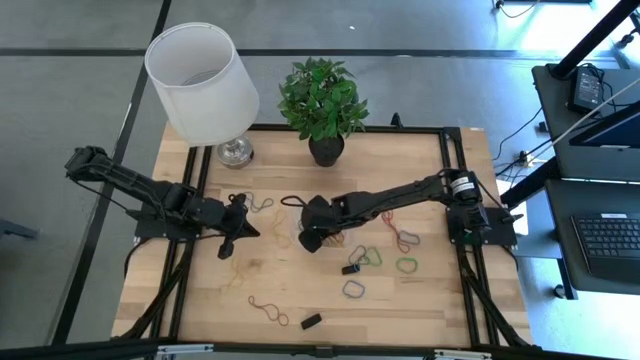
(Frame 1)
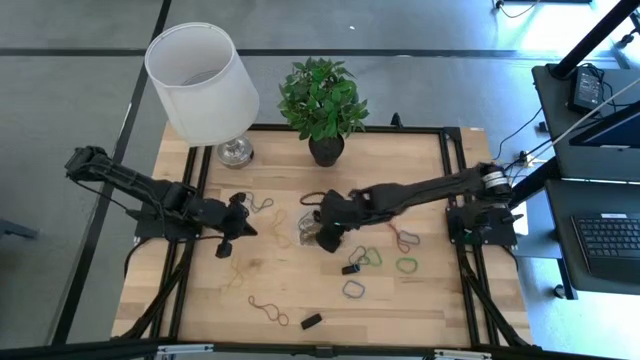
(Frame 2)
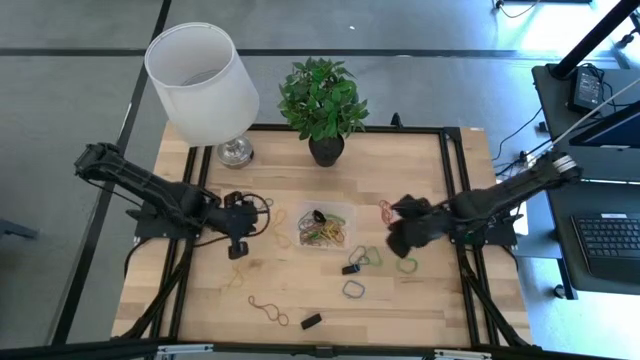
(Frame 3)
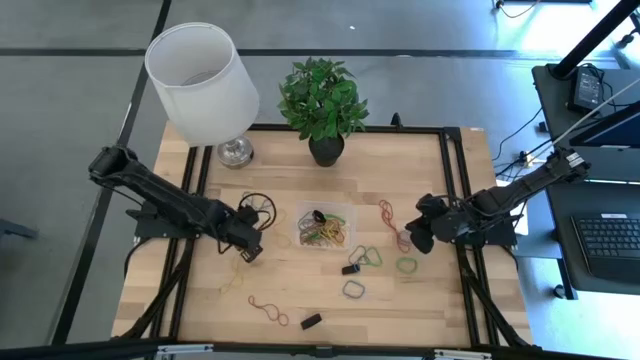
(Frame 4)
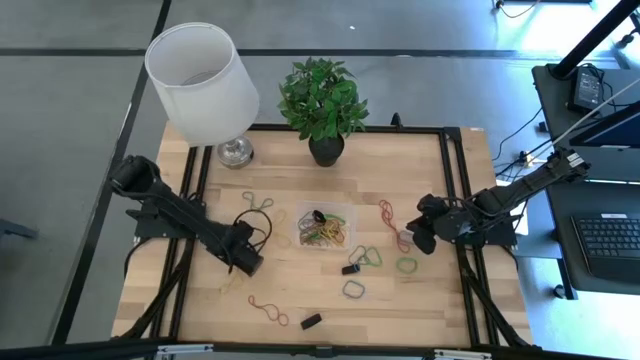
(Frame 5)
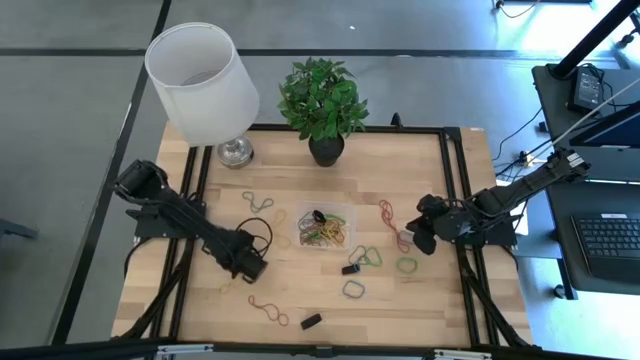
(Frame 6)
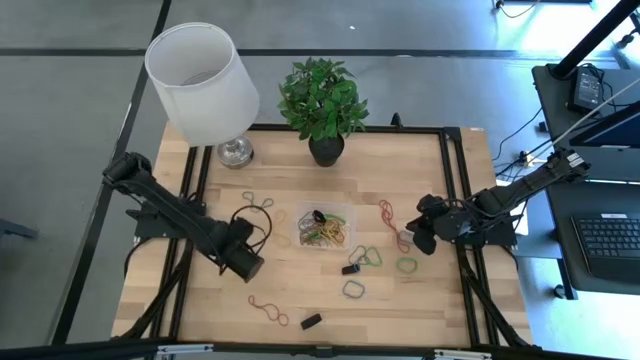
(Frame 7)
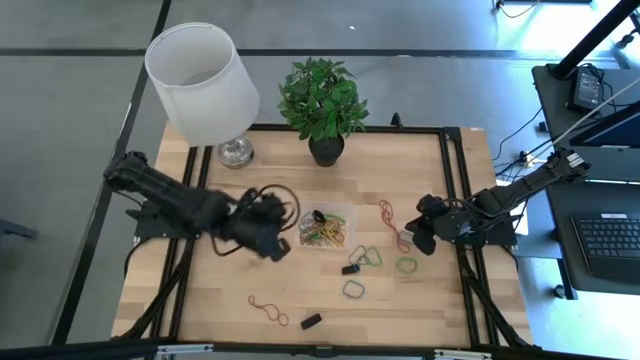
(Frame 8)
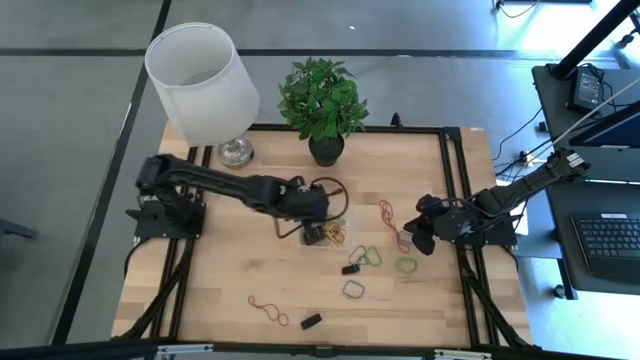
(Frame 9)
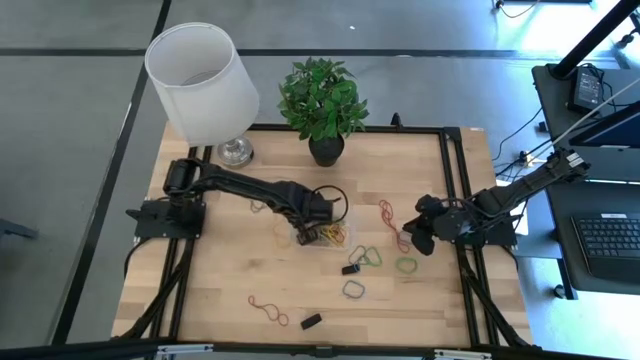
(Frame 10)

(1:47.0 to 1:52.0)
Task: Pick and place rubber bands into bin
Put the bottom yellow rubber band into the transparent container

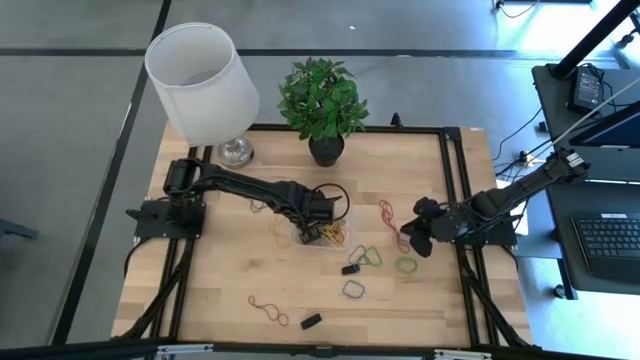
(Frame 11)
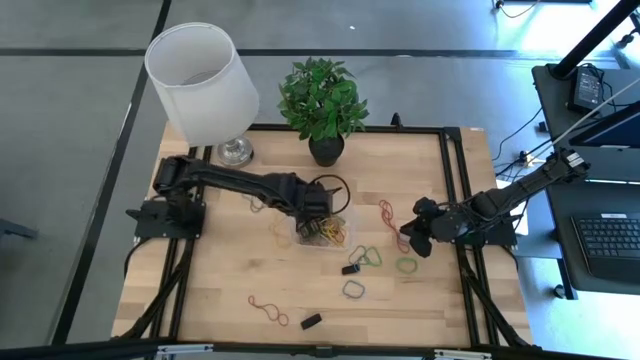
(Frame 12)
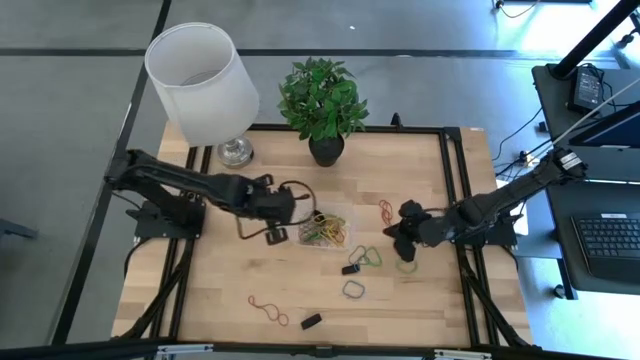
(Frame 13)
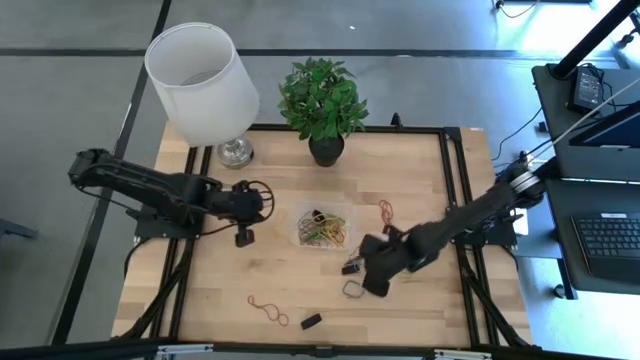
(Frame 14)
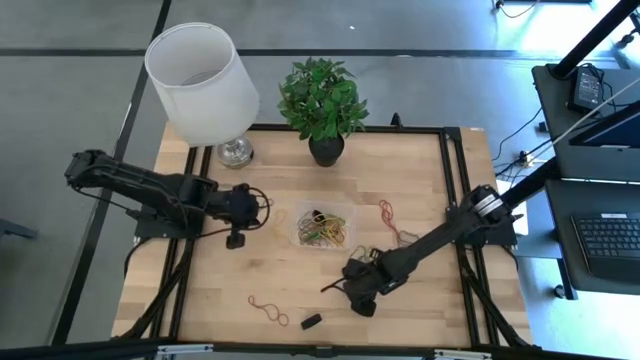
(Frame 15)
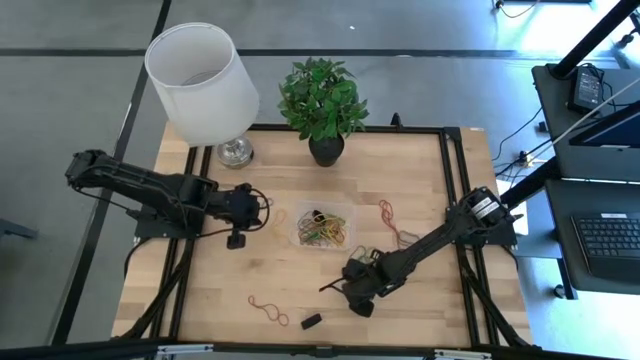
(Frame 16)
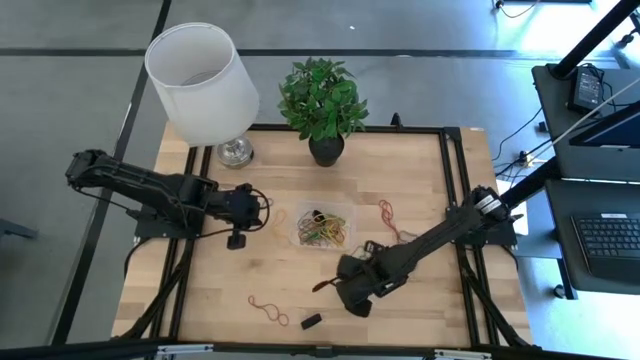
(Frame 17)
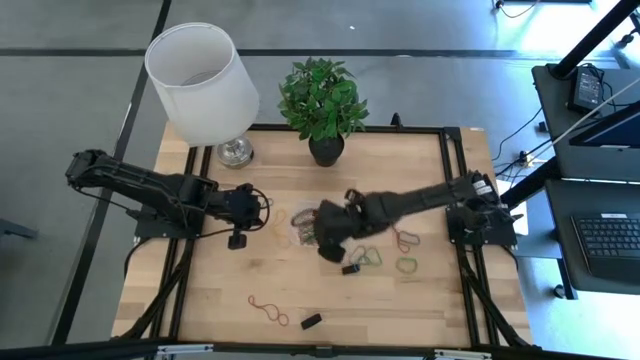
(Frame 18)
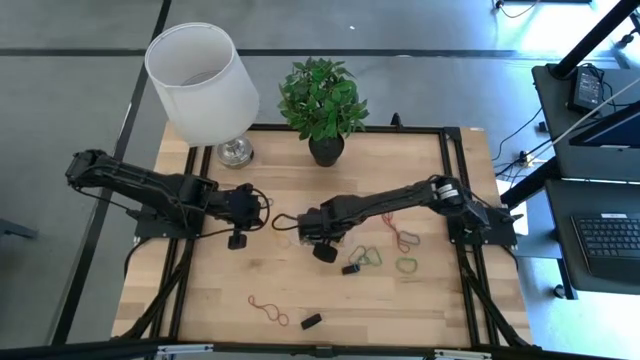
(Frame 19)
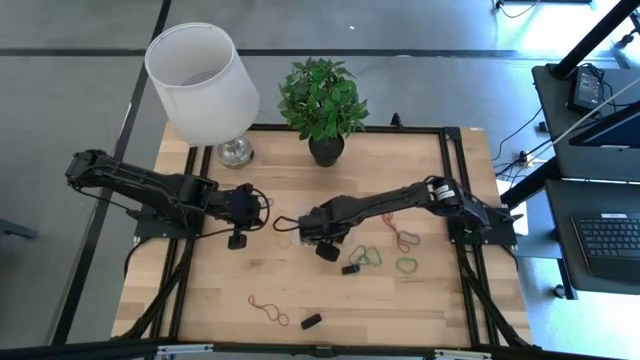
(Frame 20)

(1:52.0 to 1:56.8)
Put the blue rubber band into the transparent container

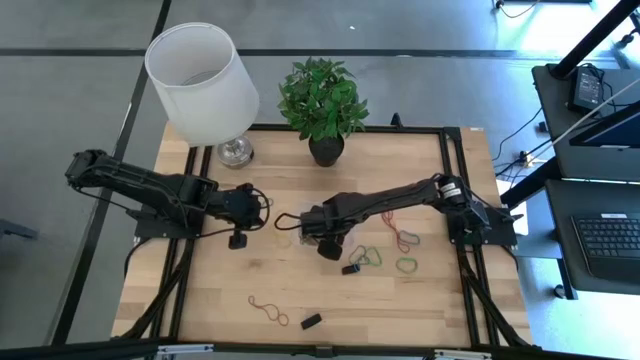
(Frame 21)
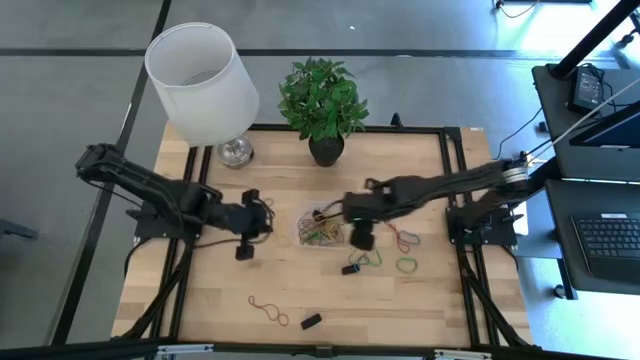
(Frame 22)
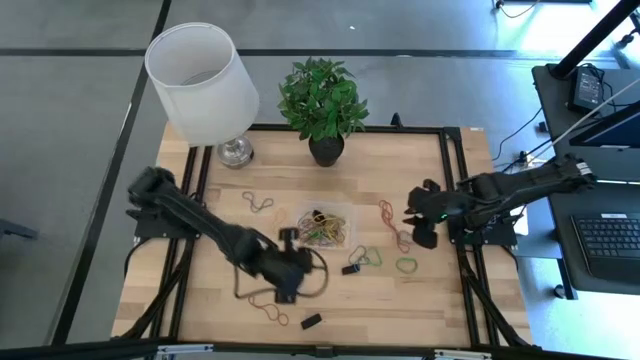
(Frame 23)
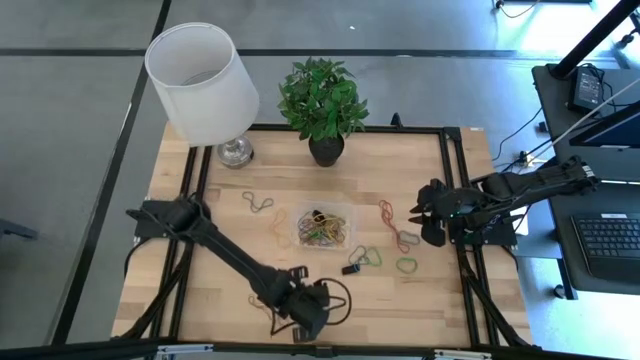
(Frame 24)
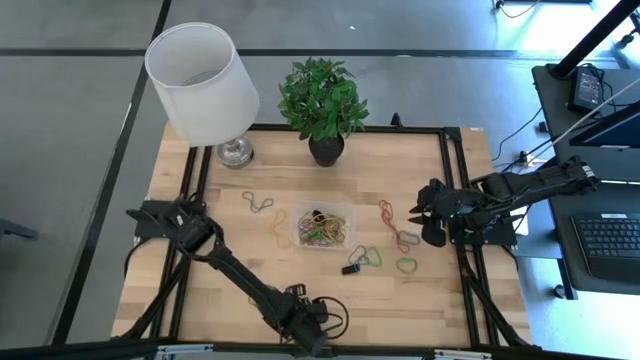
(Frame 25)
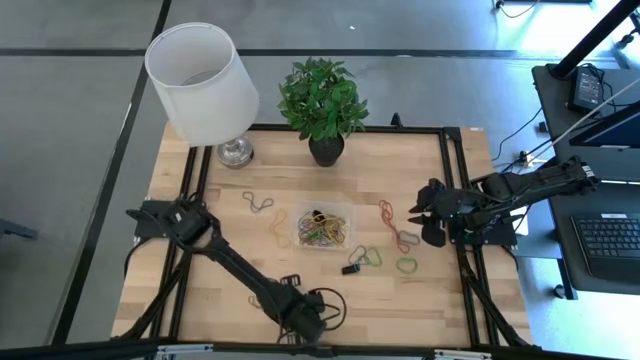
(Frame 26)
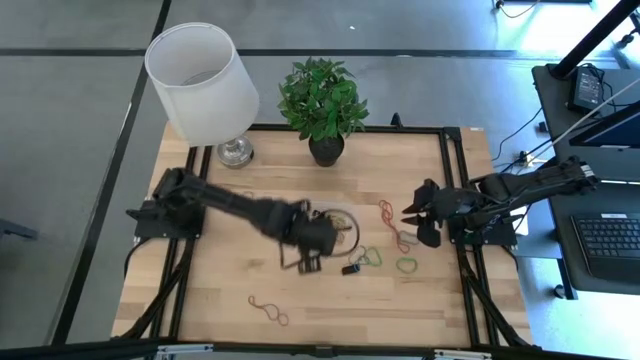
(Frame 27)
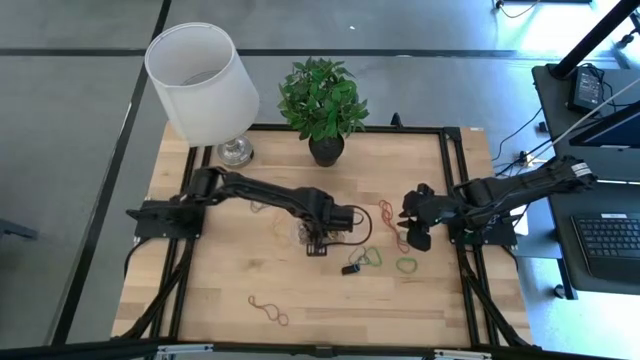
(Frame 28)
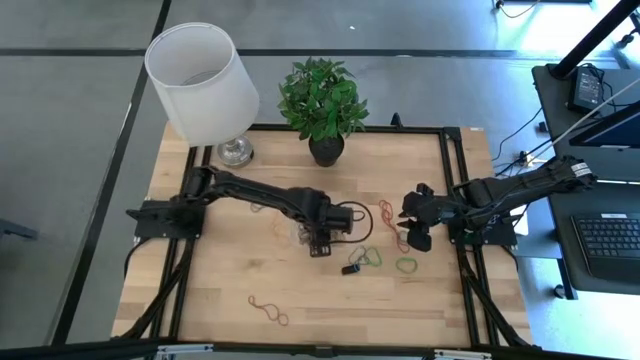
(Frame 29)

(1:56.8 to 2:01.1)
Put the bottom black rubber band into the transparent container

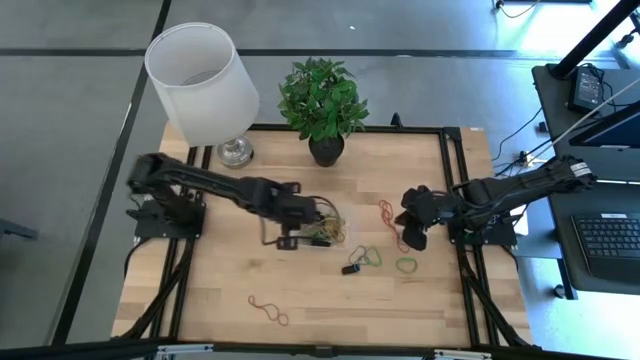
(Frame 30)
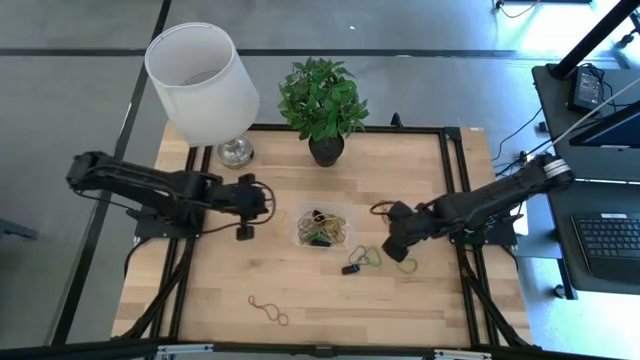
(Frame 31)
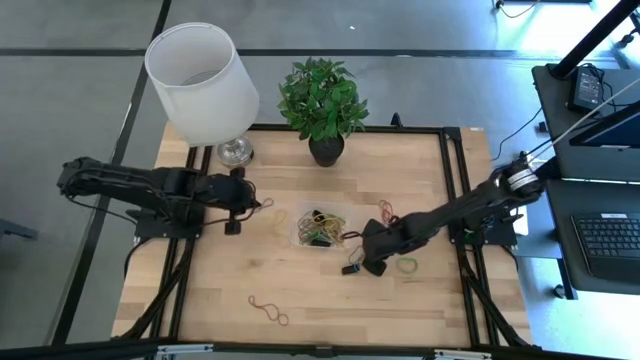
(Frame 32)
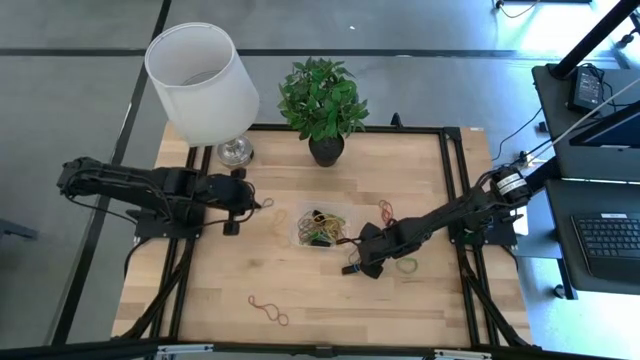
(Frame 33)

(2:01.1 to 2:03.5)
Put the left green rubber band into the transparent container

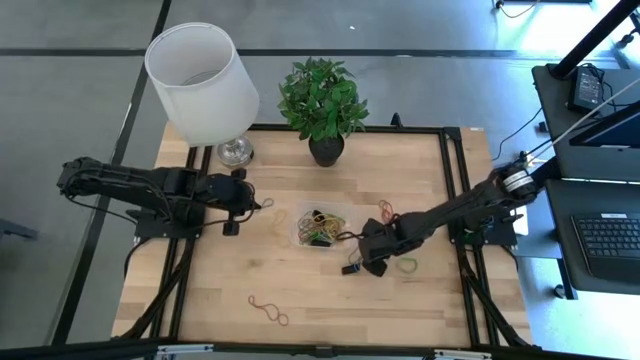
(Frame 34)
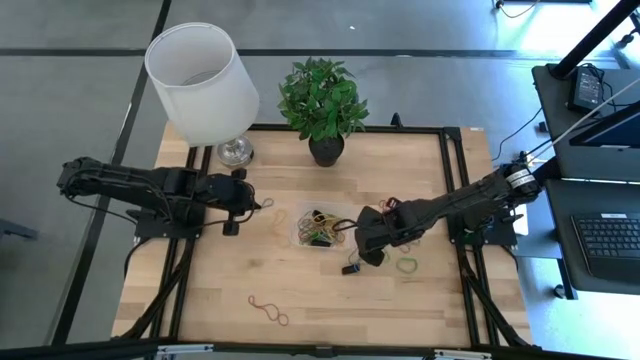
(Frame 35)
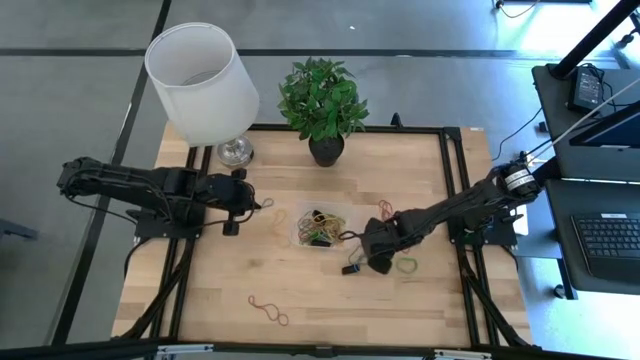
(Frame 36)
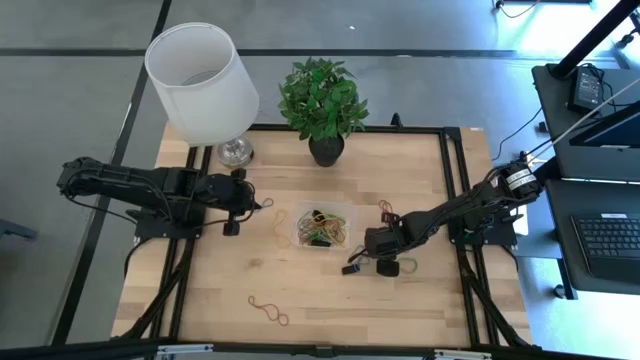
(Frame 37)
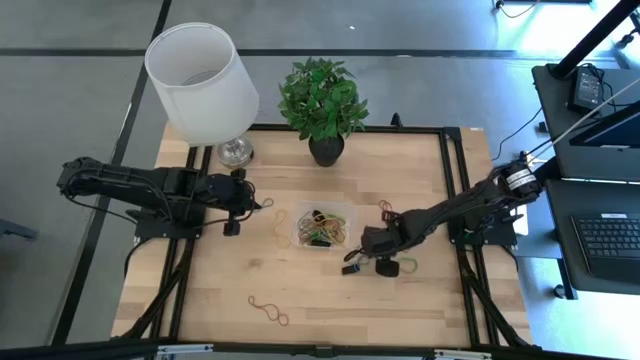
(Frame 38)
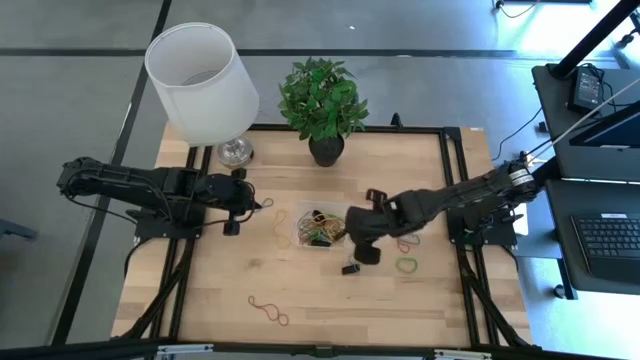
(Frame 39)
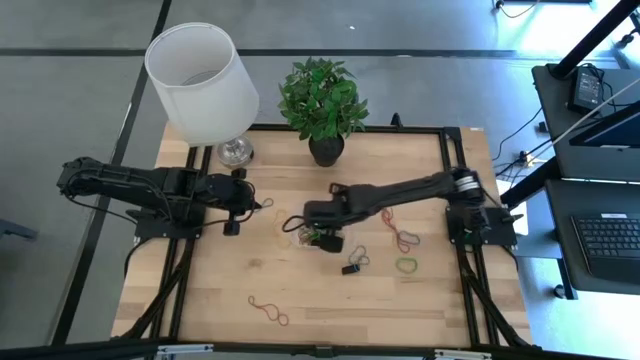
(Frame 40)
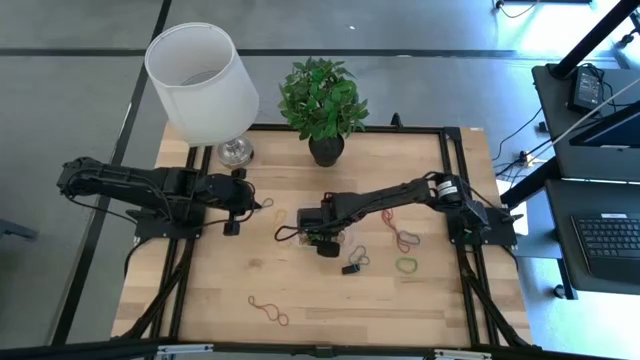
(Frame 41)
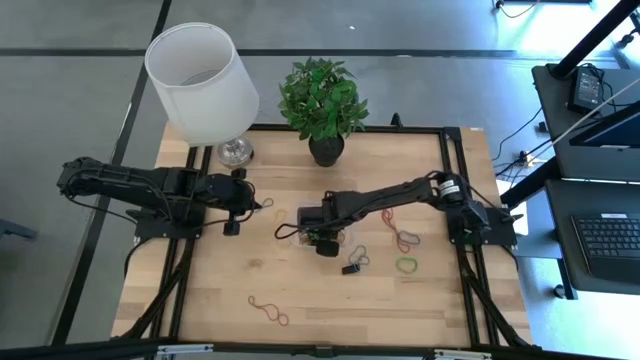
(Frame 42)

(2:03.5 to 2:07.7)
Put the left green rubber band into the transparent container

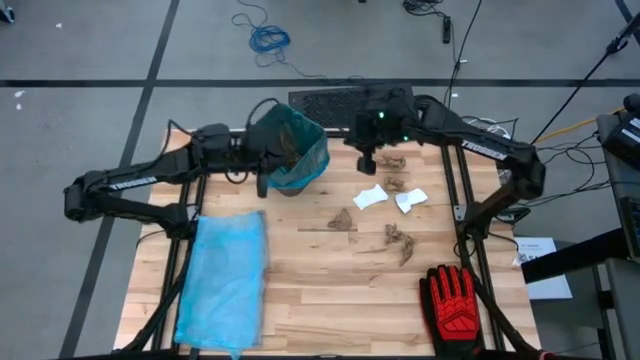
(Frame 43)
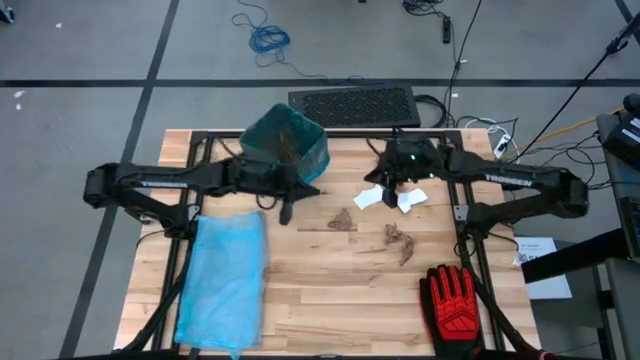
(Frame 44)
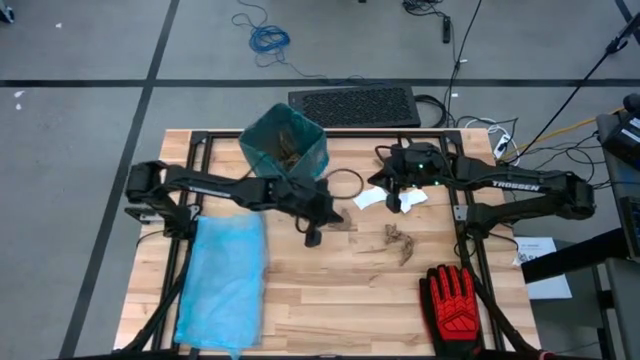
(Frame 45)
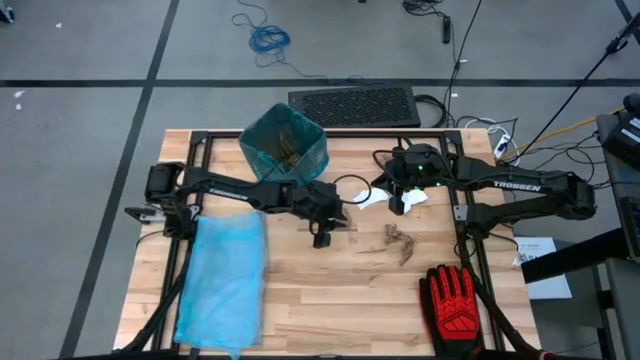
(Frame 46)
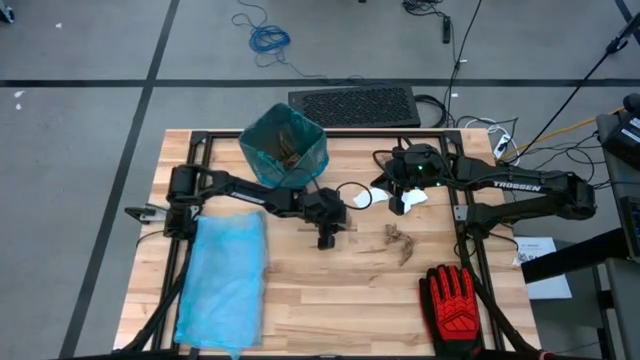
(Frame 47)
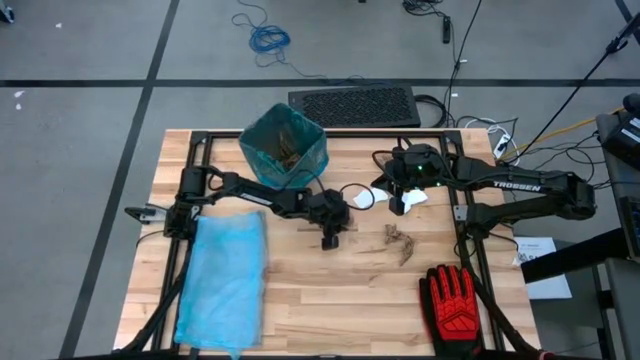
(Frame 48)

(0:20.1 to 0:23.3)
Task: place trash/remove bag and relplace
Put the brown napkin into the black trash bin
